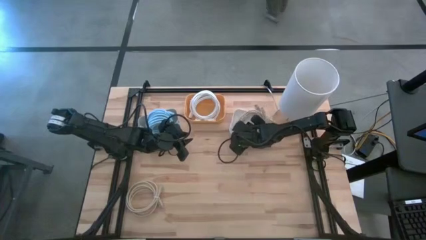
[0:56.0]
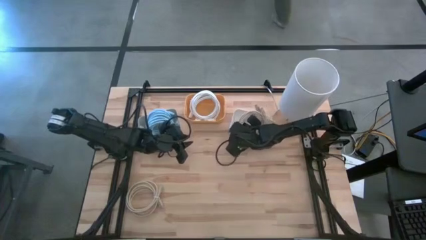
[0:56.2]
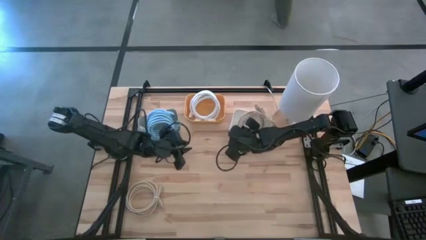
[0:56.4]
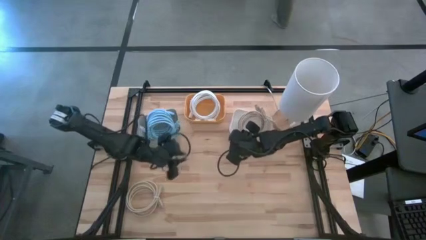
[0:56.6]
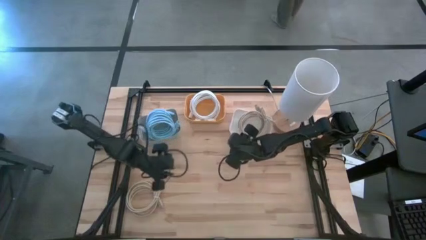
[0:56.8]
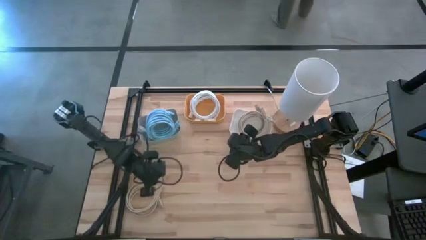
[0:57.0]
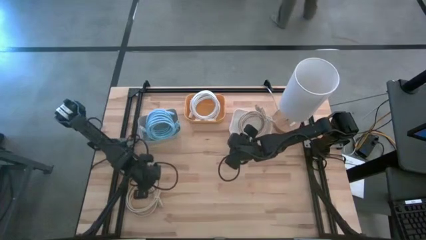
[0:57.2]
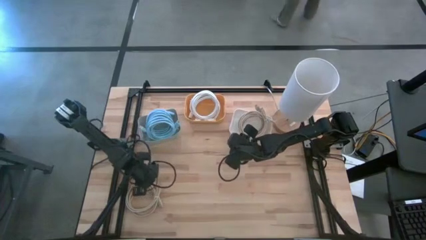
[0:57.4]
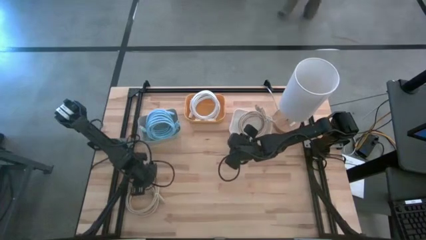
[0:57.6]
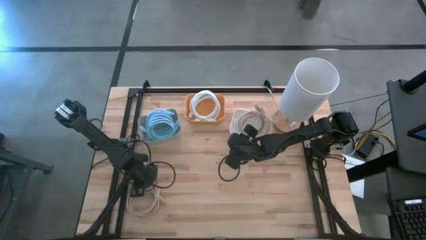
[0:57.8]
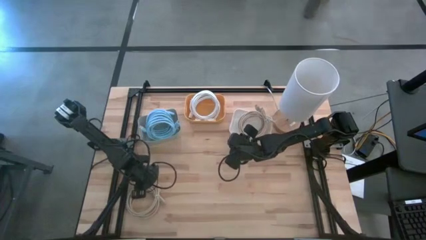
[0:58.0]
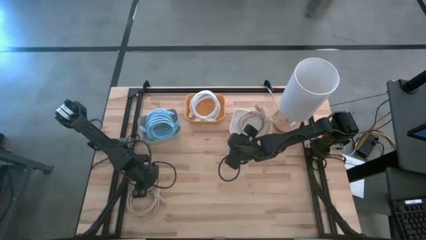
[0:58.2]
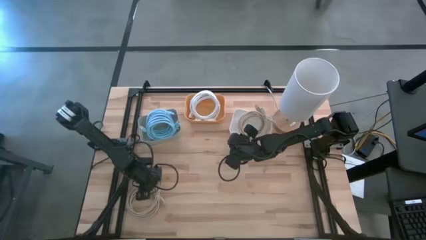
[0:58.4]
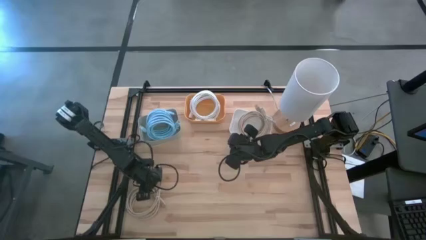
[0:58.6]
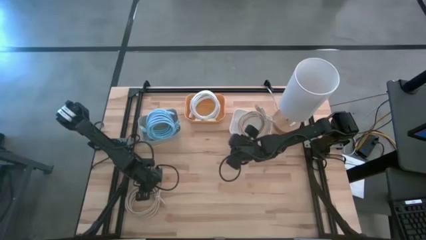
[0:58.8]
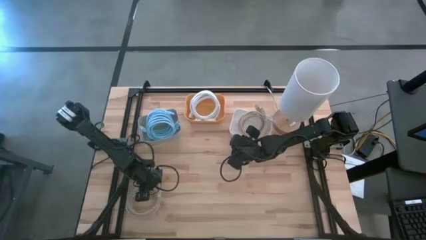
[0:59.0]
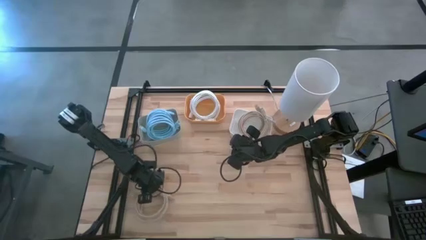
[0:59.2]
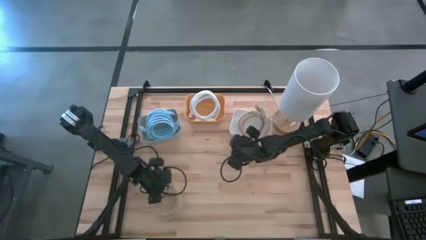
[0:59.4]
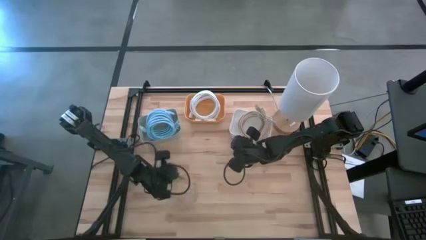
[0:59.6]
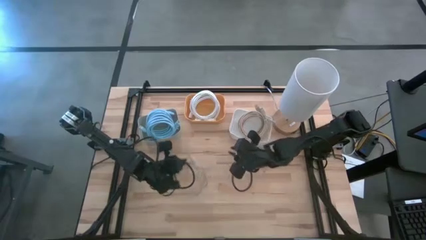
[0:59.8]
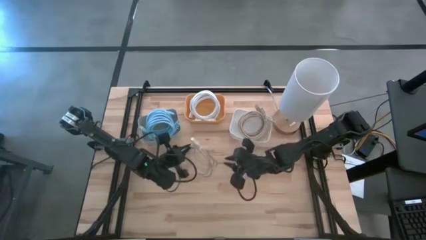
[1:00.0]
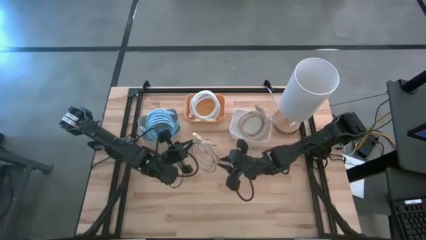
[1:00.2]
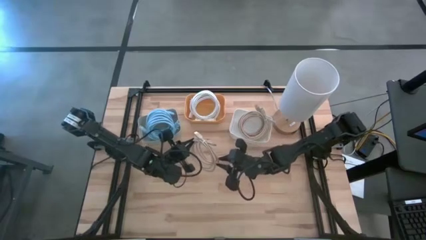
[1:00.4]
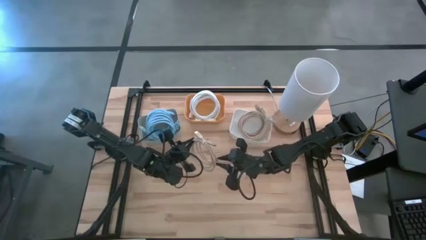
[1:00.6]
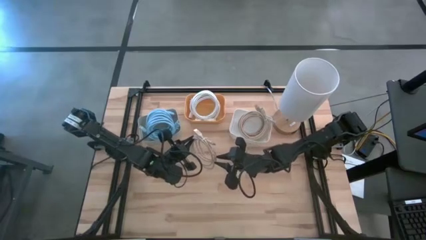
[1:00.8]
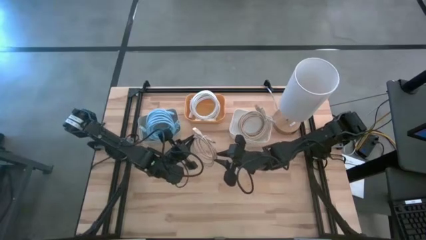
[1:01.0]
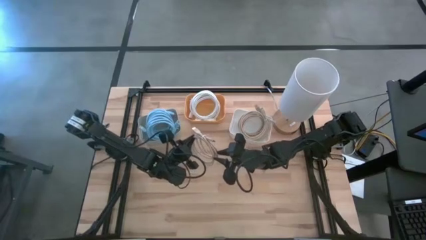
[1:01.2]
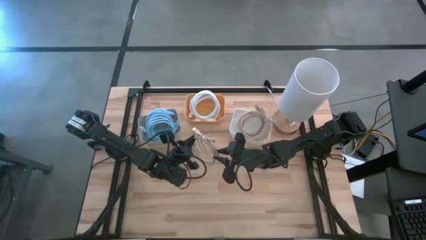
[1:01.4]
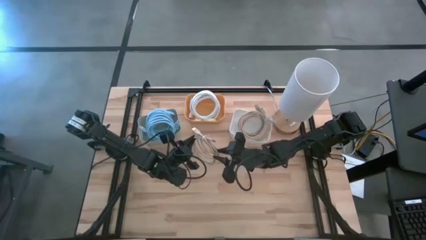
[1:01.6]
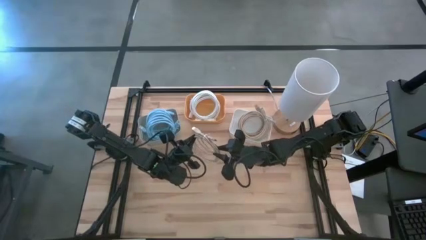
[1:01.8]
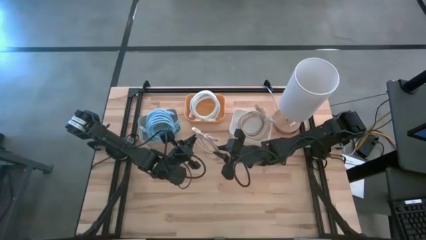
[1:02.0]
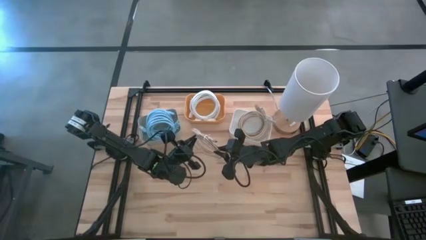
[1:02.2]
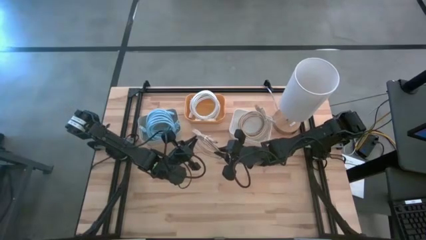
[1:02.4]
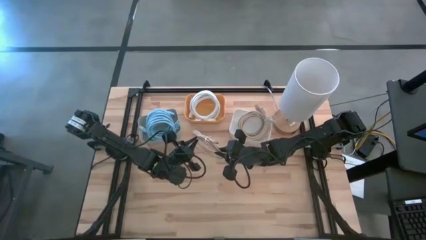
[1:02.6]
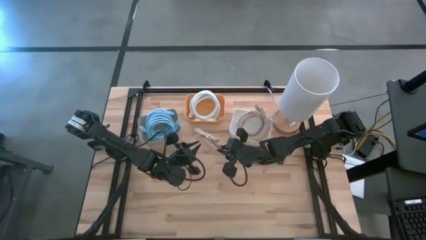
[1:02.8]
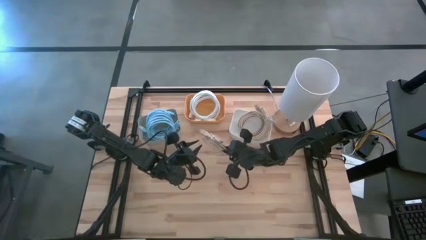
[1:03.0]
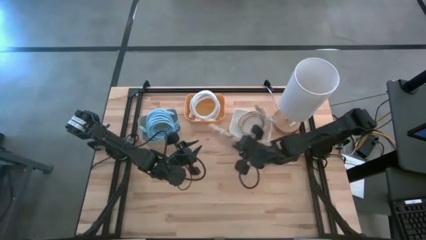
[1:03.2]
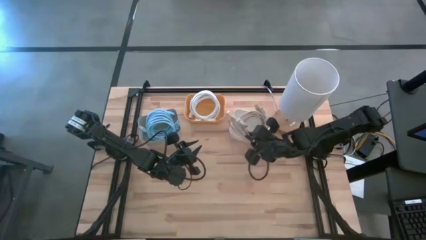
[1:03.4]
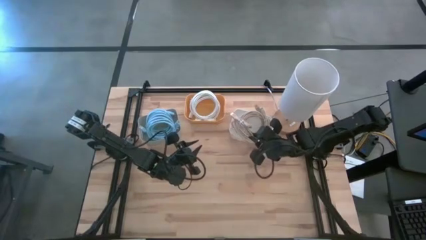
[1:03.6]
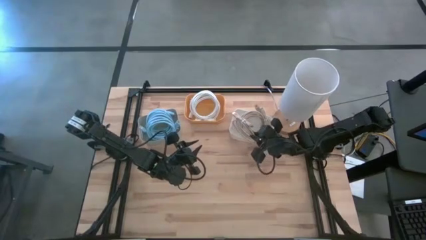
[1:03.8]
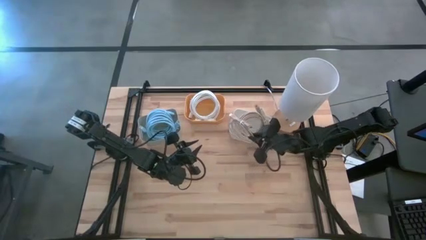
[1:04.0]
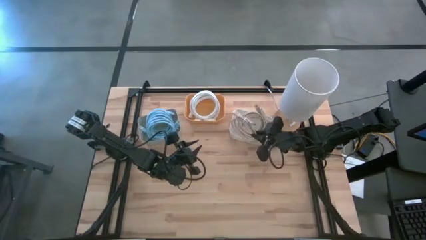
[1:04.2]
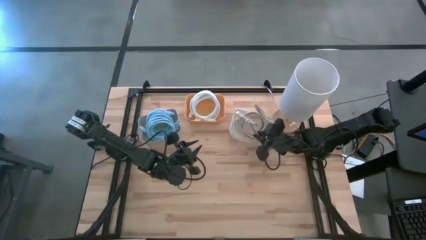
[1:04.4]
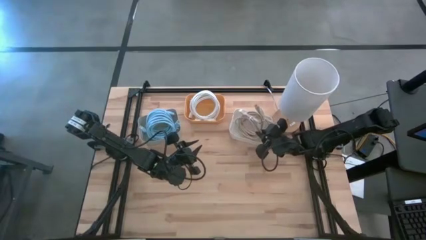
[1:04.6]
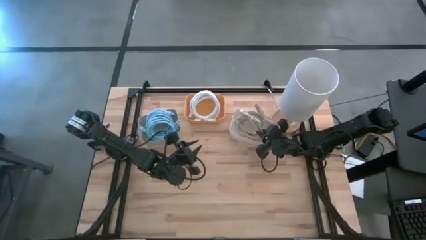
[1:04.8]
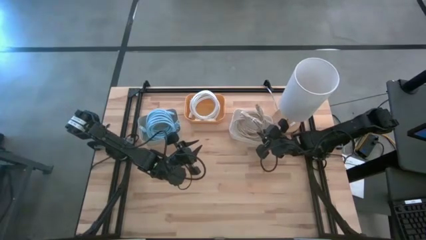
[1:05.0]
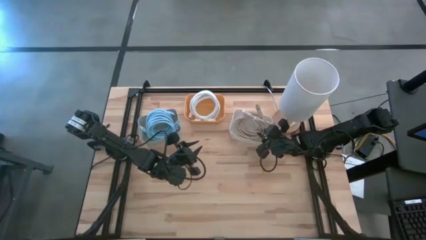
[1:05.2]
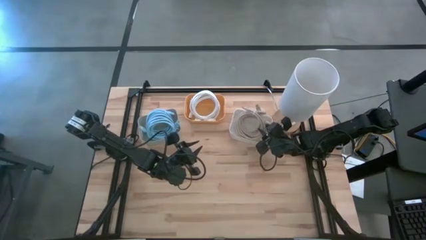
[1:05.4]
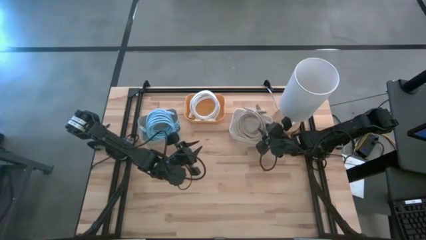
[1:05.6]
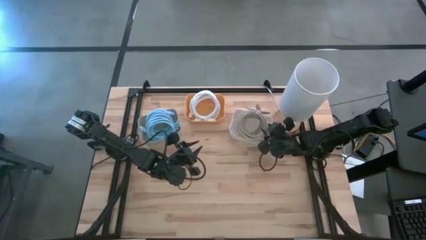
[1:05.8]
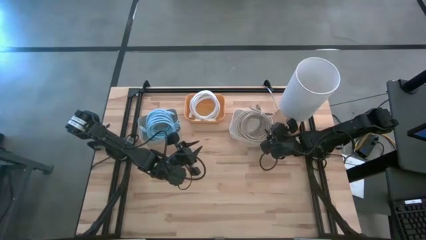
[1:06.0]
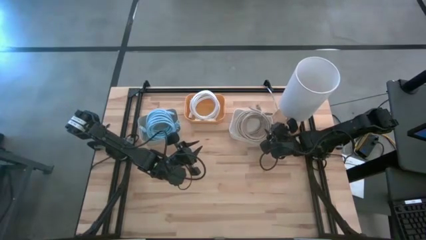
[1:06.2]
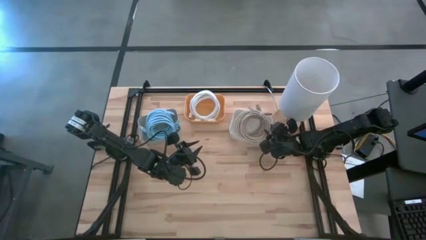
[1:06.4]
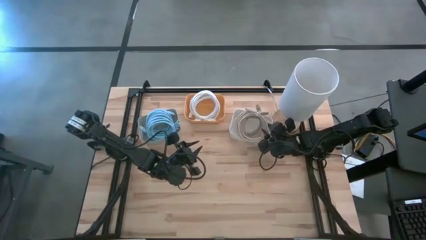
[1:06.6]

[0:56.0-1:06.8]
Task: Sort HDMI cables
Put the brown hdmi cable into the white bin
